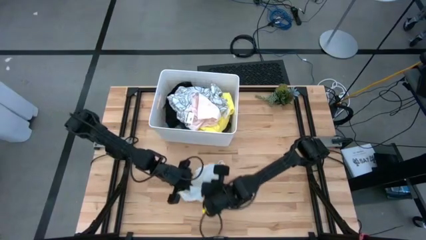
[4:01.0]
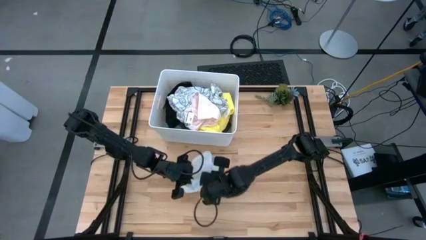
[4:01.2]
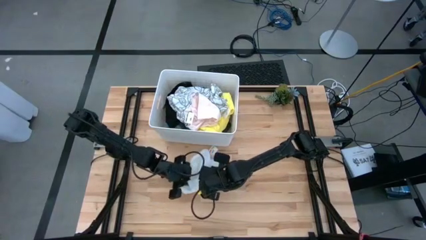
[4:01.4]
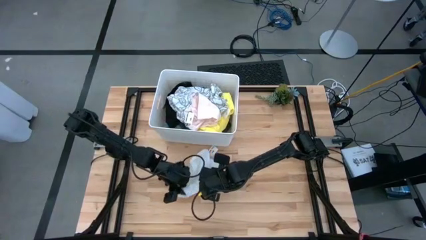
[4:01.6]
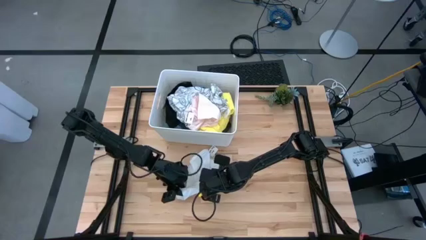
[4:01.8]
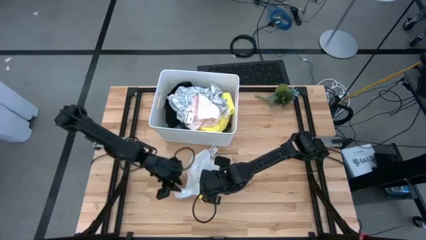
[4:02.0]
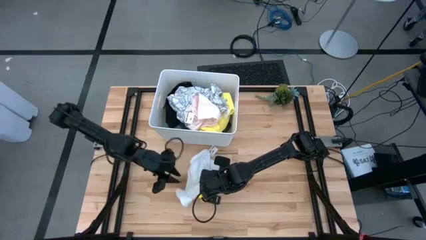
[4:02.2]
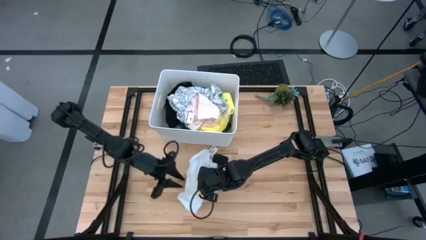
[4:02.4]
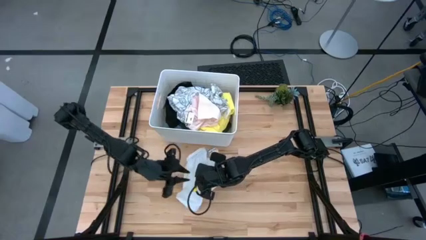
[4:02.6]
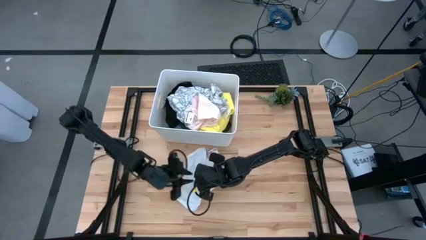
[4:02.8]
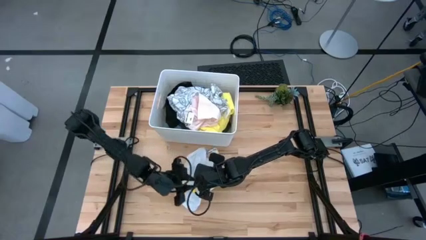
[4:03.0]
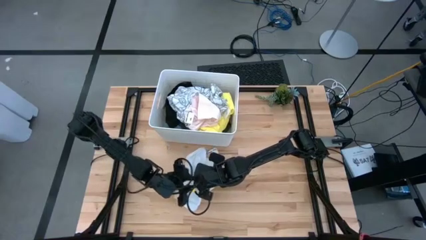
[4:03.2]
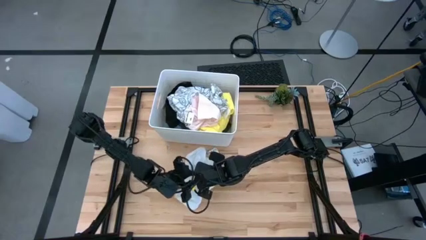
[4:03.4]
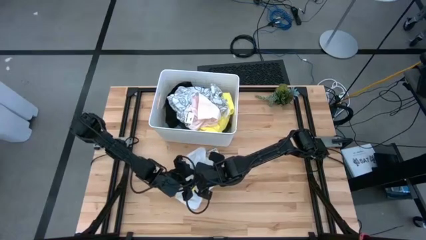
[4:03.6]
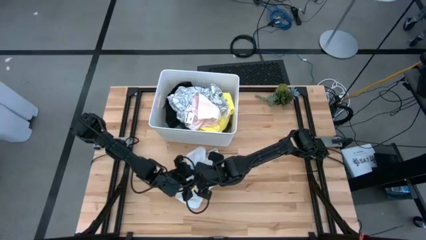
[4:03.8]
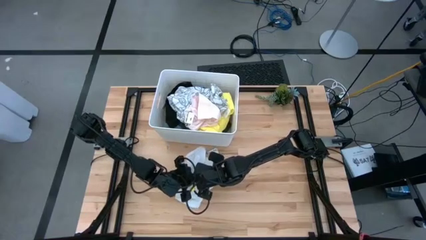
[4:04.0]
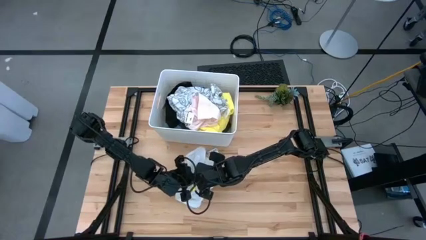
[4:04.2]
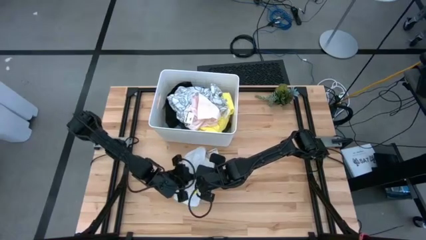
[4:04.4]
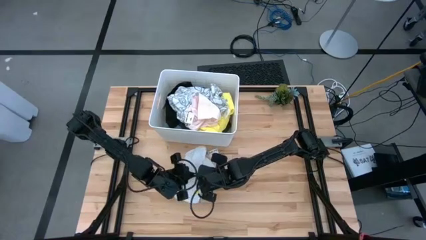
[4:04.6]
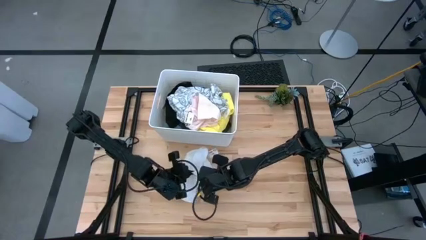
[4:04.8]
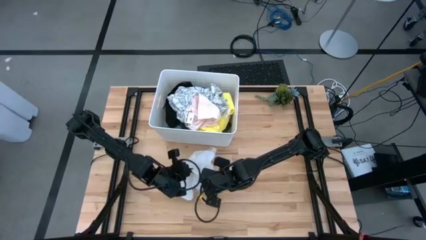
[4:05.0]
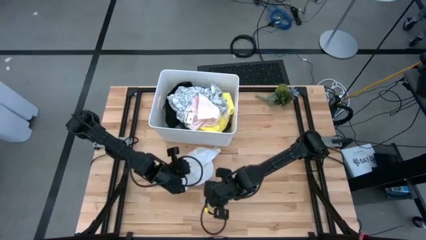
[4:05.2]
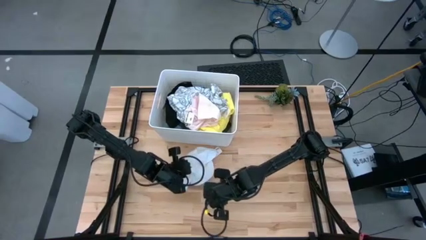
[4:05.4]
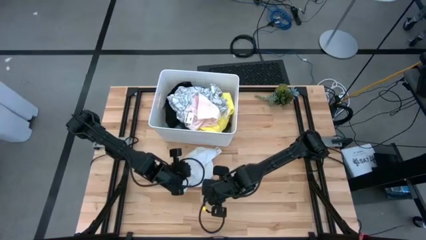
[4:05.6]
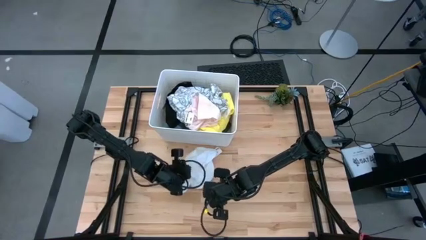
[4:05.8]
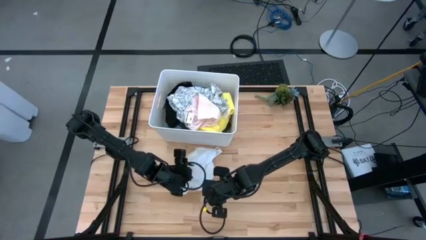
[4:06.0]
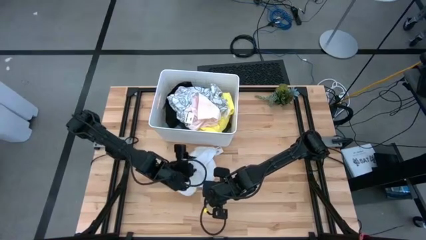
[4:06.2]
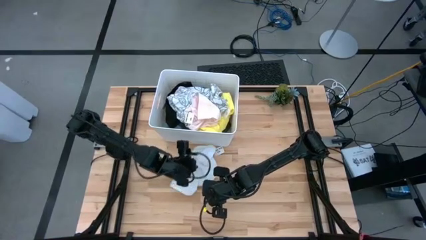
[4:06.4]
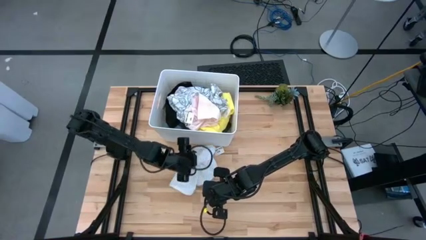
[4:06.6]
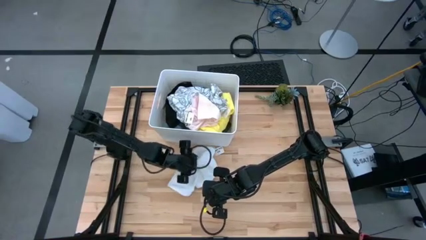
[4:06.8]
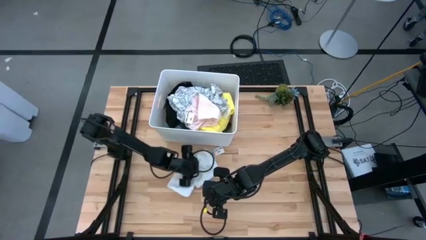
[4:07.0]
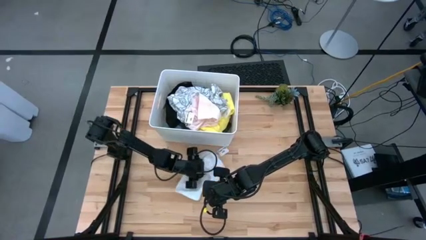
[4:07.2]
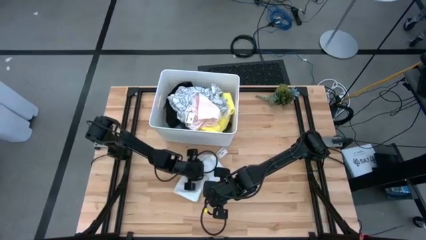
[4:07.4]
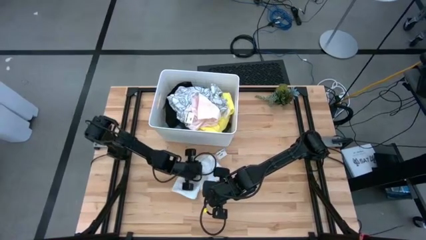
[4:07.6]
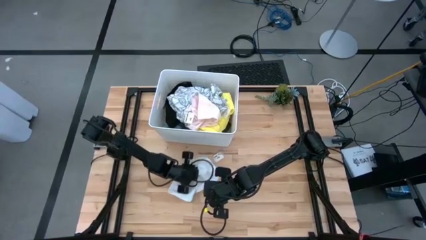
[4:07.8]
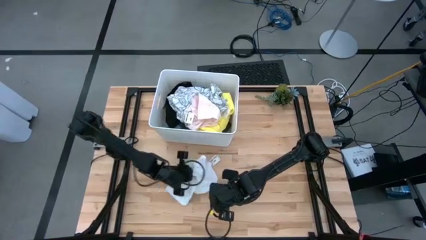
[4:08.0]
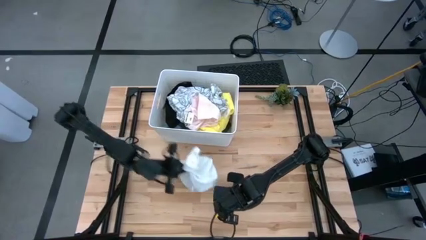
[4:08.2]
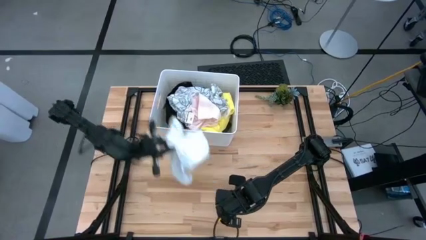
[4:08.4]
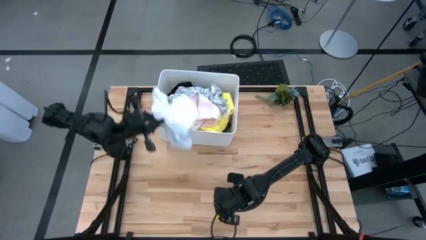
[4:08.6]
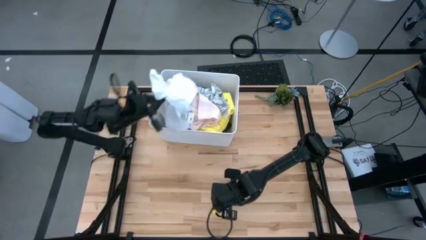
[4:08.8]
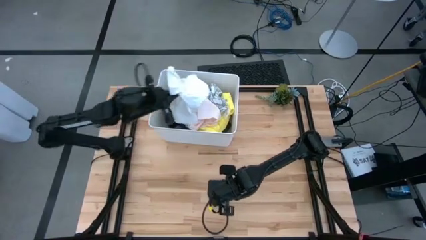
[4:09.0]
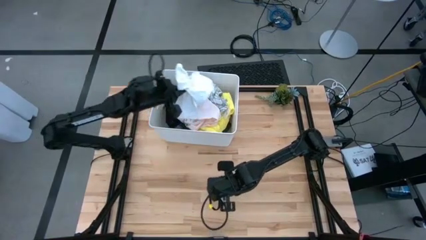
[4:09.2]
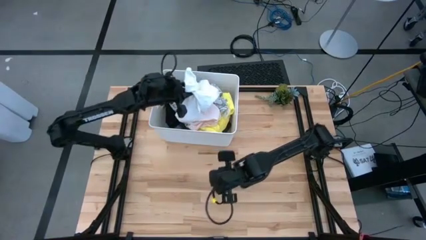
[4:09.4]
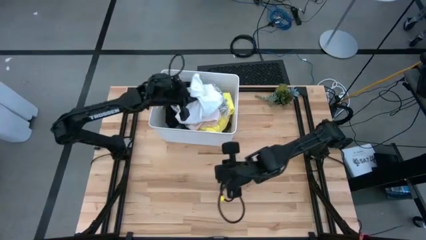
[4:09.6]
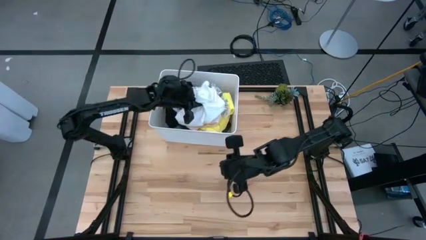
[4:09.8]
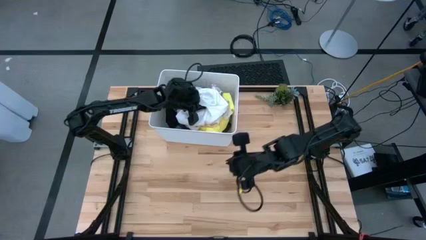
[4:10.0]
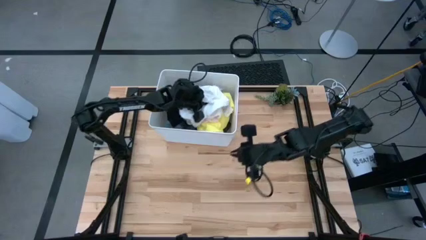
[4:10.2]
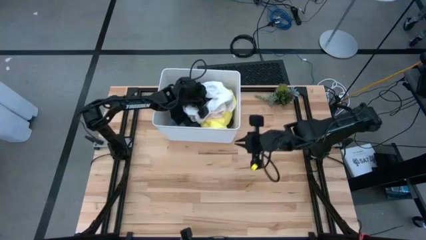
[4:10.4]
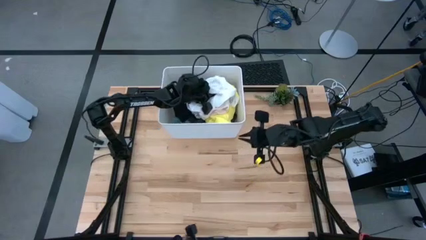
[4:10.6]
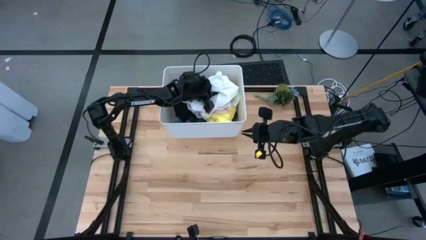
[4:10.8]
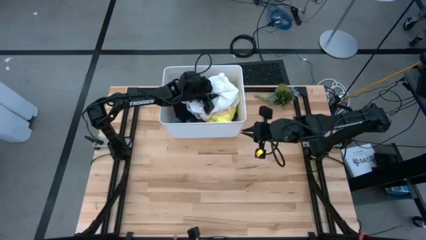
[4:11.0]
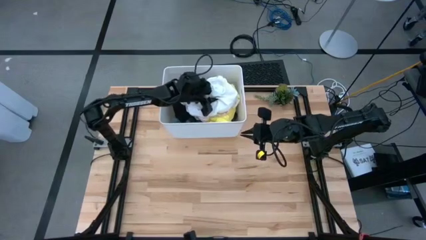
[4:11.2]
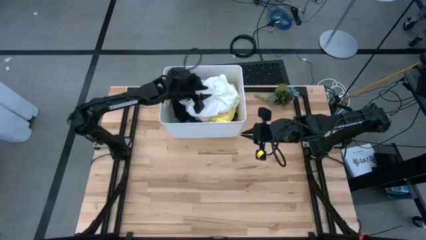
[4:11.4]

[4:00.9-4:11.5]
Task: Fold laundry
Put the white underwear into the white laundry bin

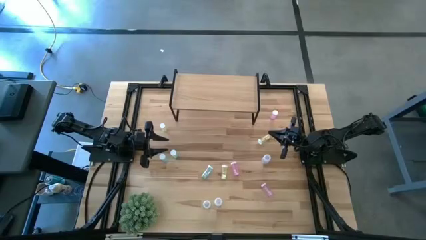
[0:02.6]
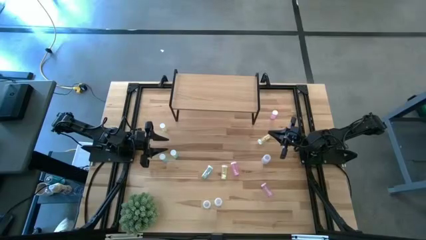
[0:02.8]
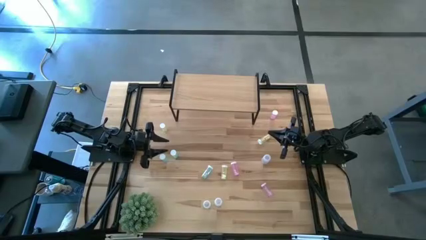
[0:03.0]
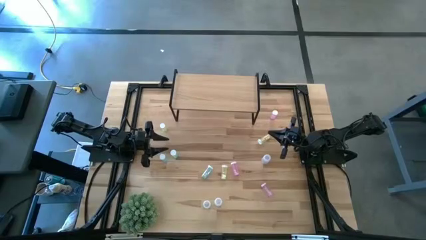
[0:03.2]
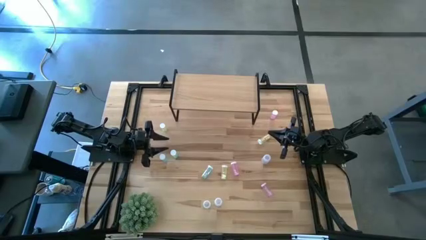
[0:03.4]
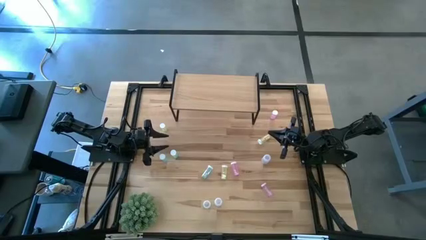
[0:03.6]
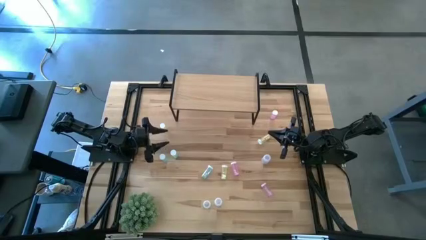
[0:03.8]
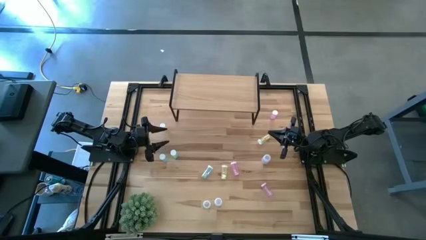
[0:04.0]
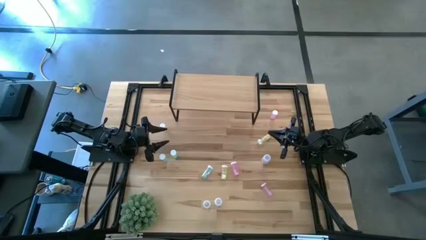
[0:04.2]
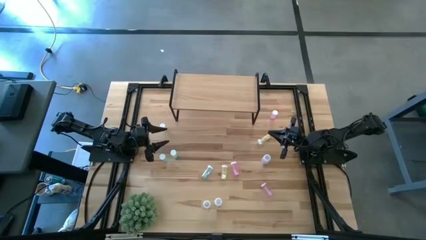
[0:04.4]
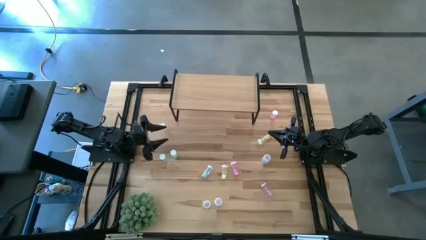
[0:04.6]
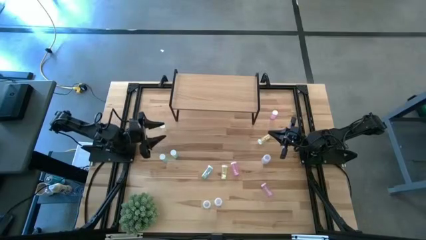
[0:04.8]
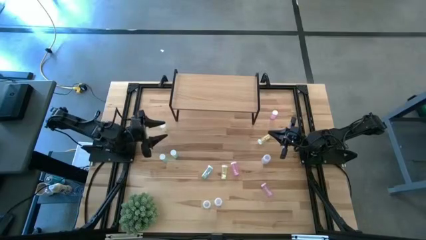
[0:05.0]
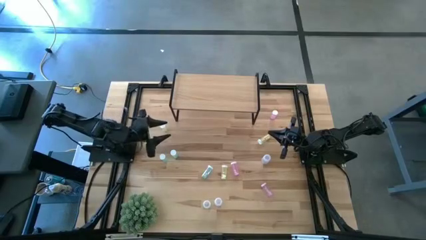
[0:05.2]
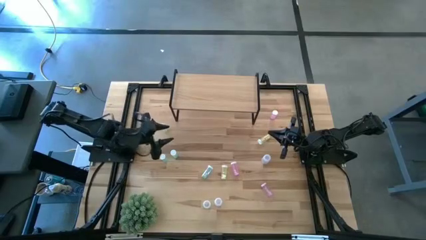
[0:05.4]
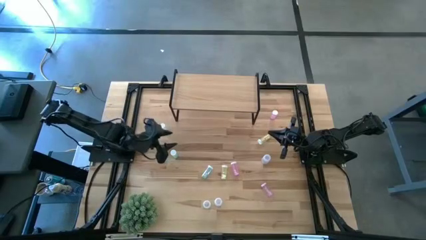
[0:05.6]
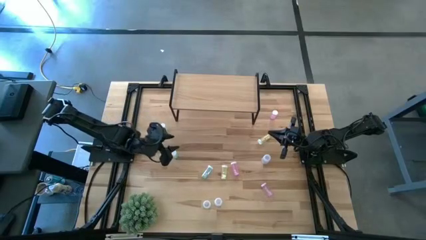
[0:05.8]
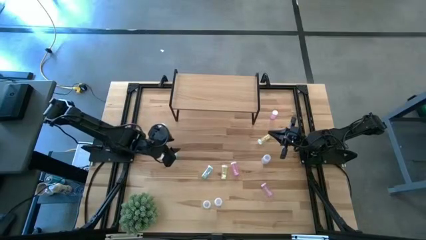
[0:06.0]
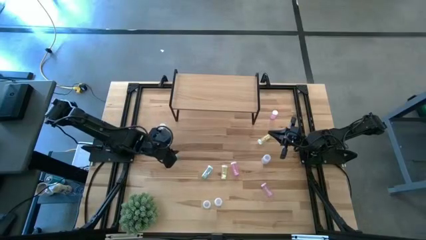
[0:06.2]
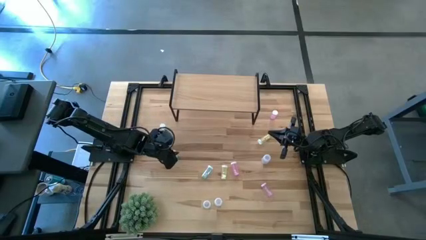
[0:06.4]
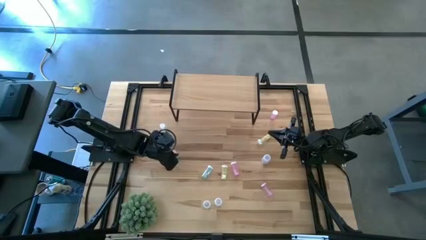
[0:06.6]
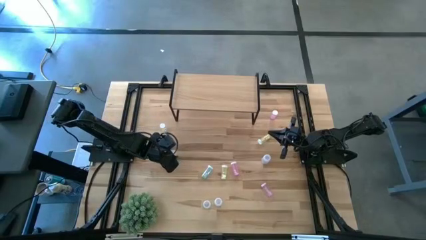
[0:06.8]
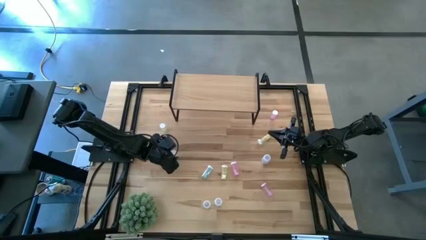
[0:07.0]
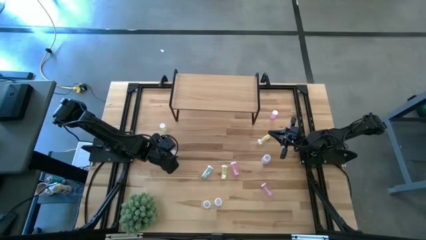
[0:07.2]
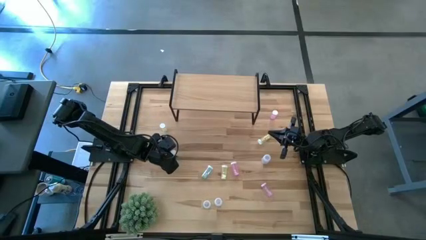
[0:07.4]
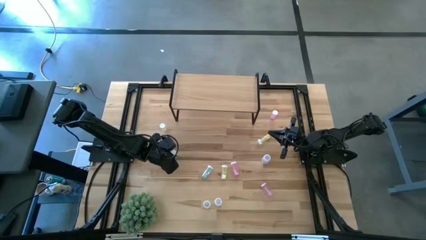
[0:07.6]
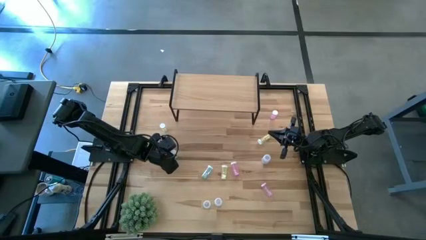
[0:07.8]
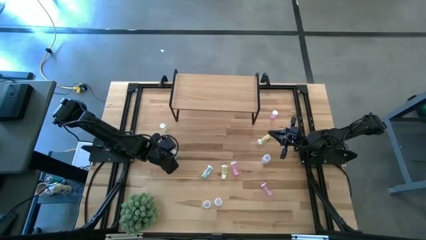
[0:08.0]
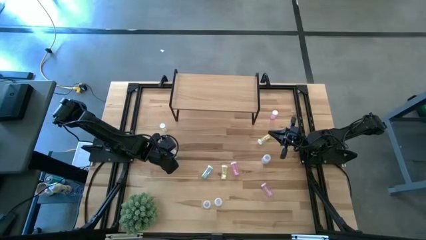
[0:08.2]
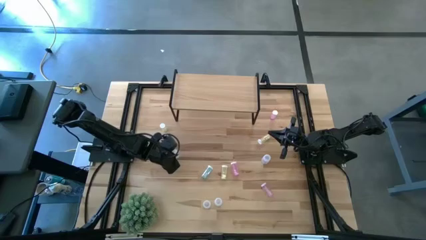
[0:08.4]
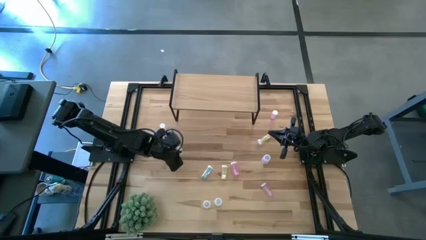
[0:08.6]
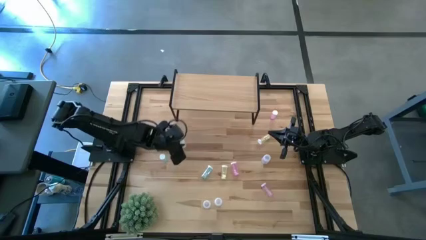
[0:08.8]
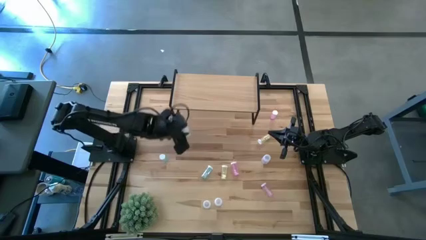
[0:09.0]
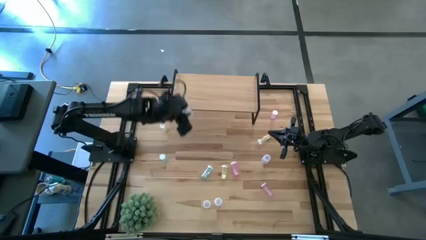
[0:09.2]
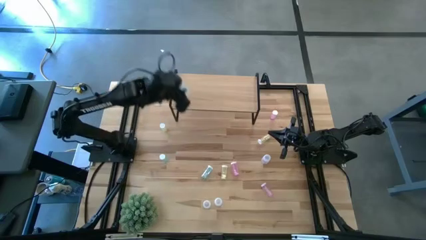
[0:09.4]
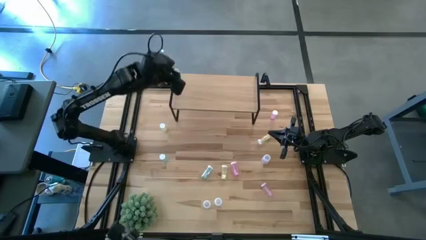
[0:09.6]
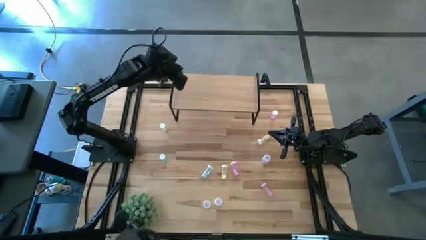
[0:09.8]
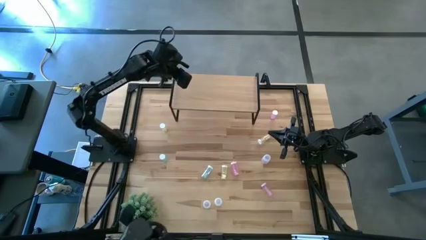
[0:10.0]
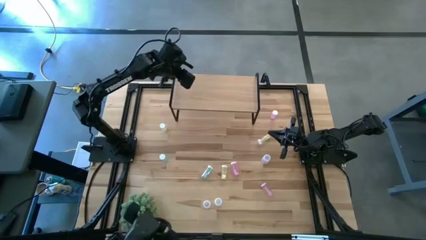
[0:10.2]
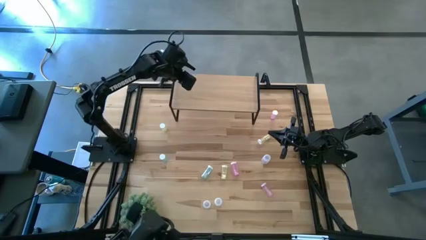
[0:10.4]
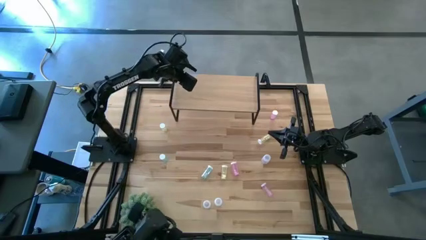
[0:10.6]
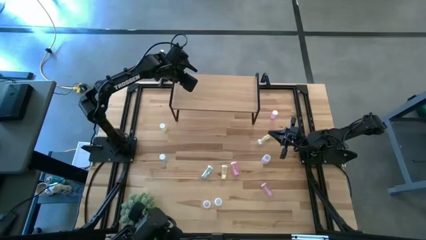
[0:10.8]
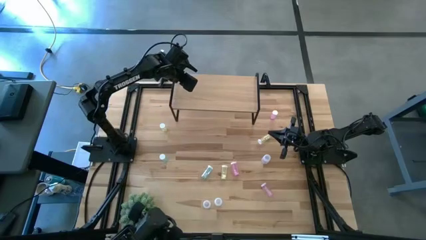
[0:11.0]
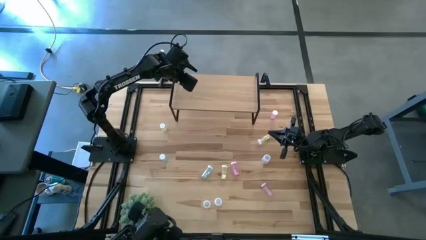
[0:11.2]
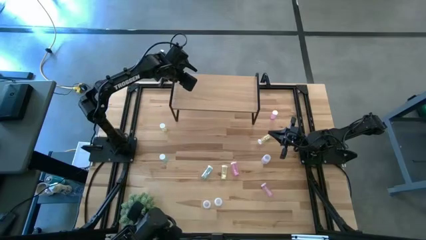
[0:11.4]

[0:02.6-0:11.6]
Task: Pick and place medicine bottles onto shelf by color
Put the top left blue pill bottle on the shelf
